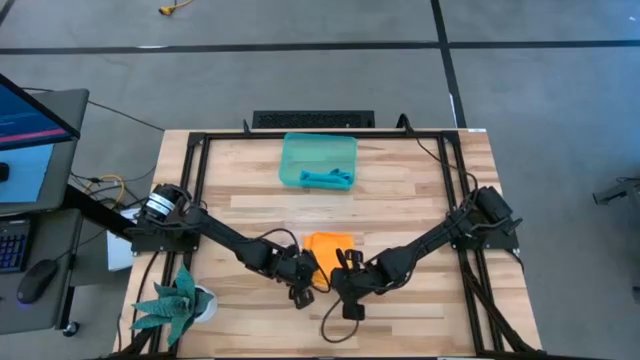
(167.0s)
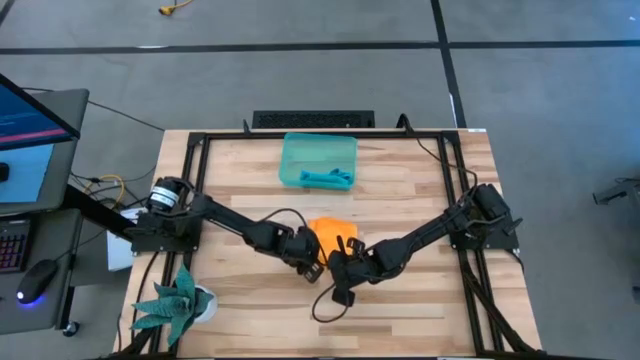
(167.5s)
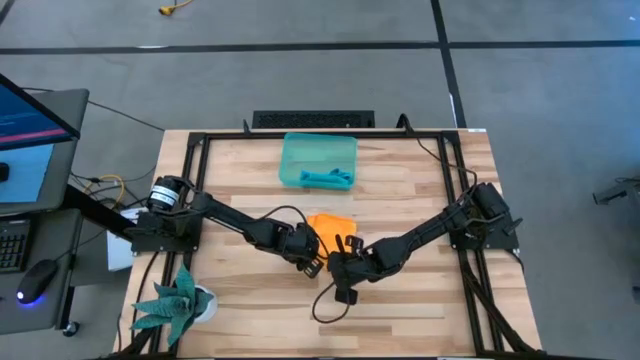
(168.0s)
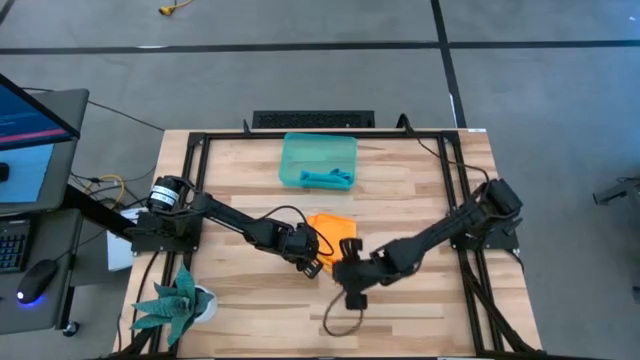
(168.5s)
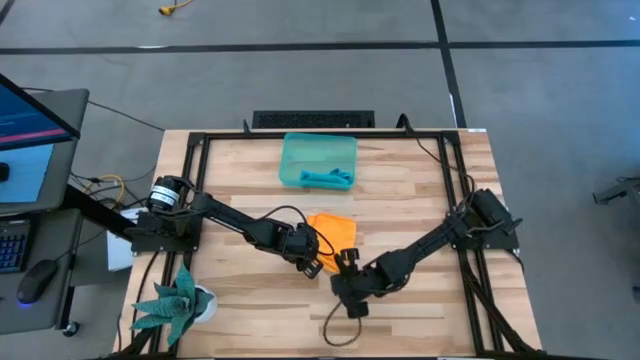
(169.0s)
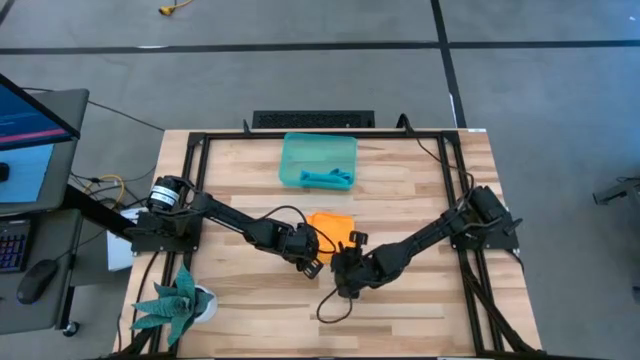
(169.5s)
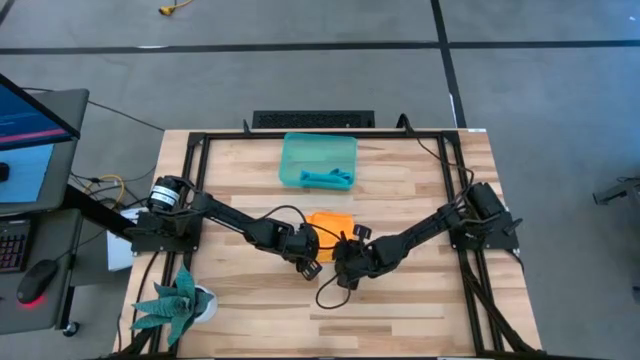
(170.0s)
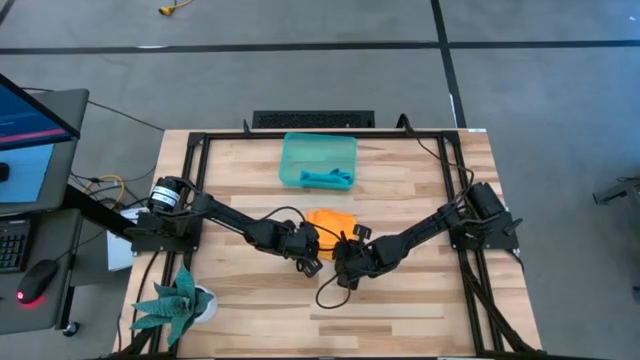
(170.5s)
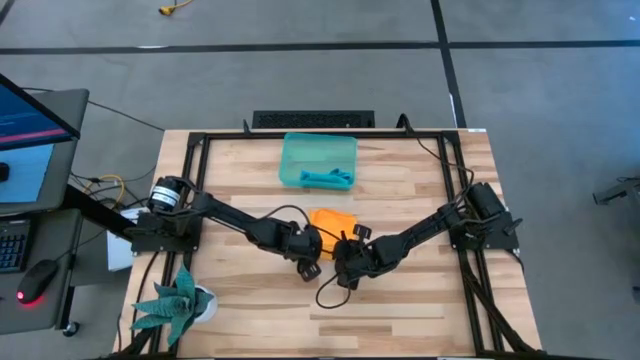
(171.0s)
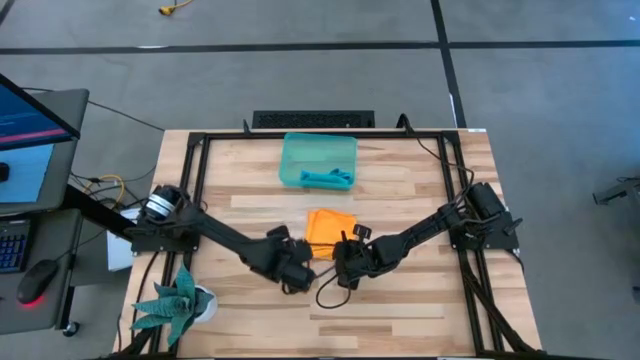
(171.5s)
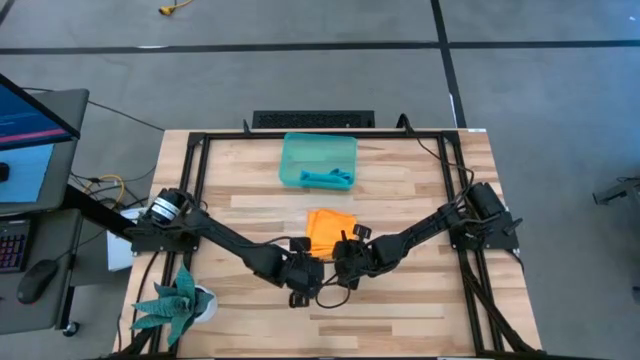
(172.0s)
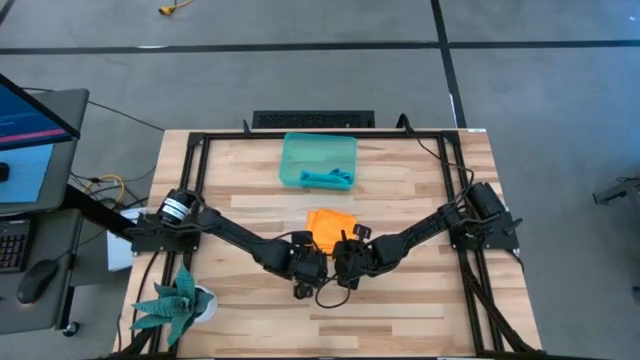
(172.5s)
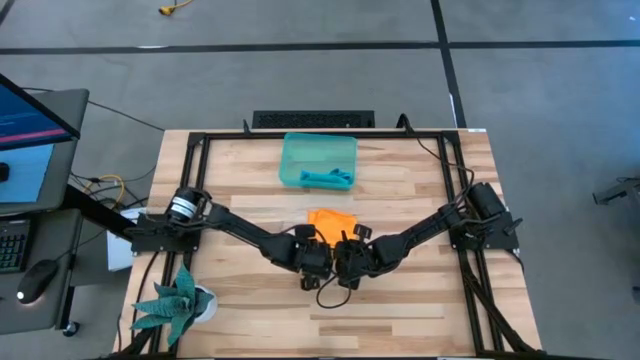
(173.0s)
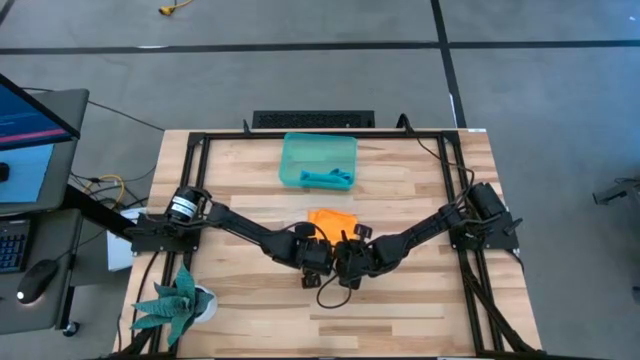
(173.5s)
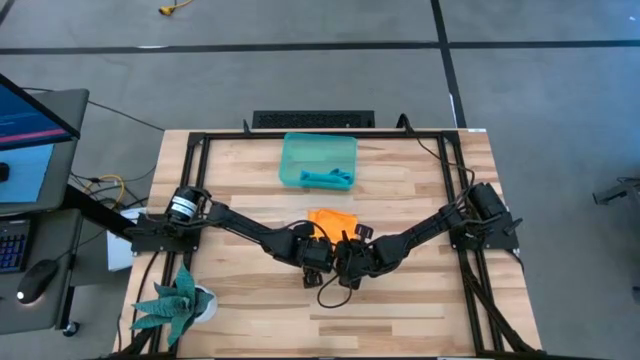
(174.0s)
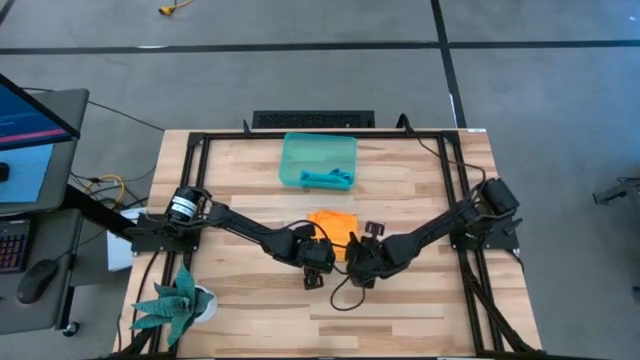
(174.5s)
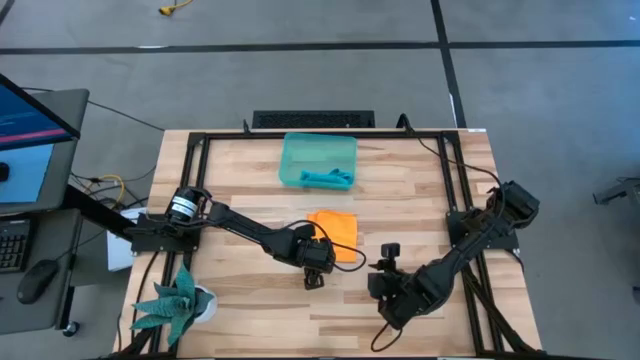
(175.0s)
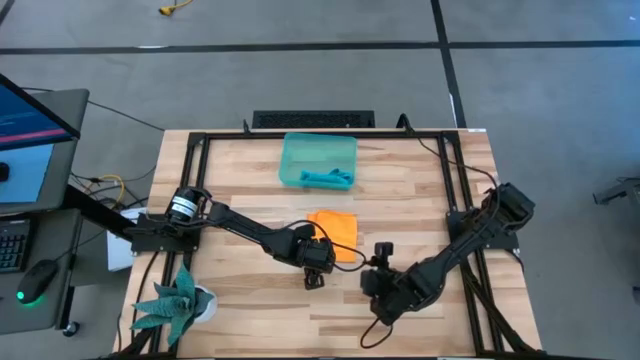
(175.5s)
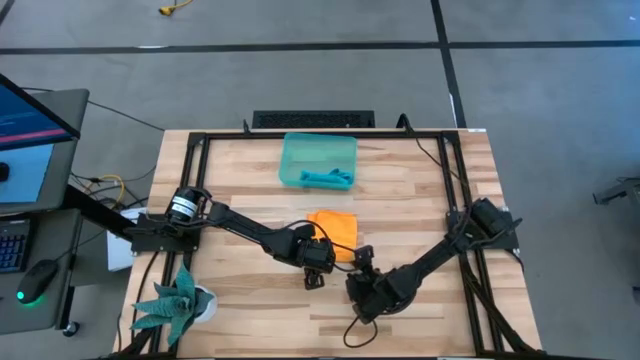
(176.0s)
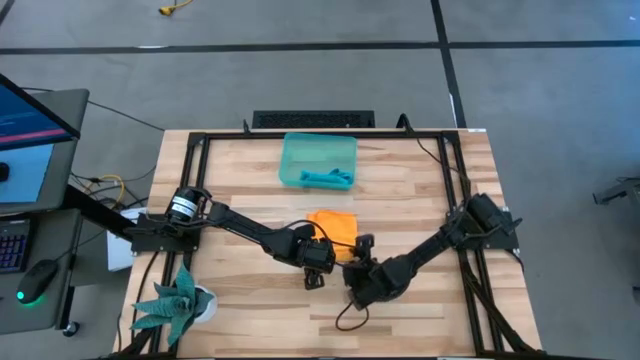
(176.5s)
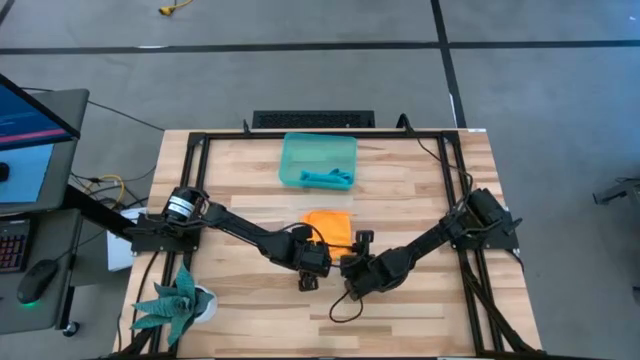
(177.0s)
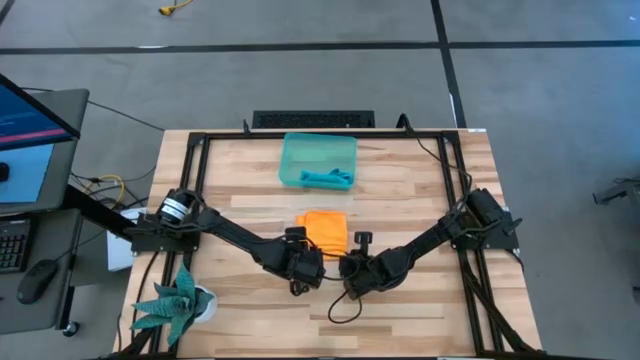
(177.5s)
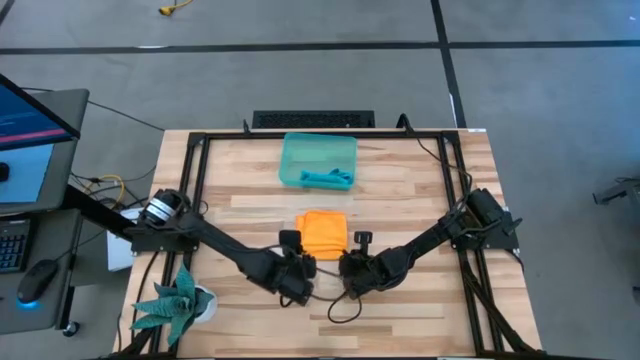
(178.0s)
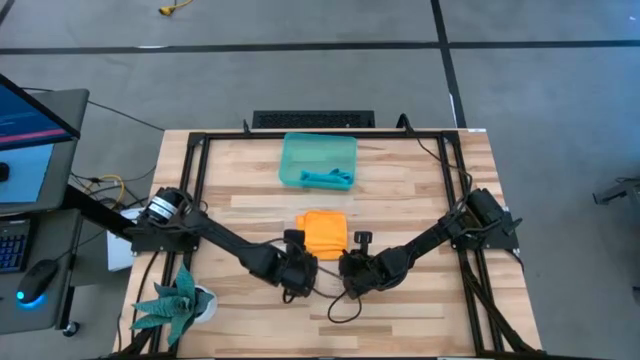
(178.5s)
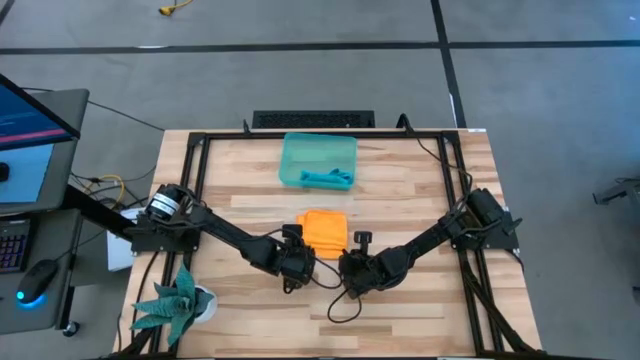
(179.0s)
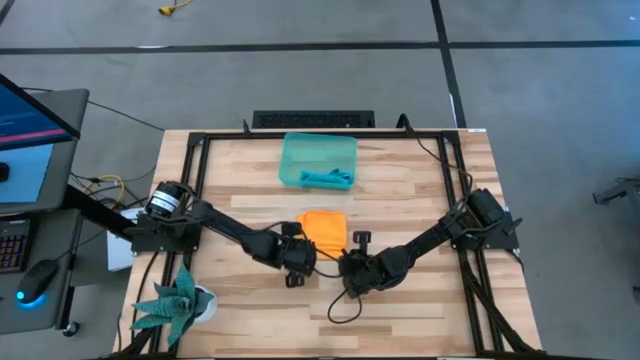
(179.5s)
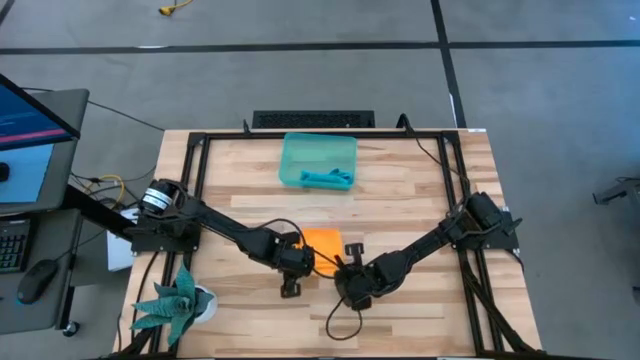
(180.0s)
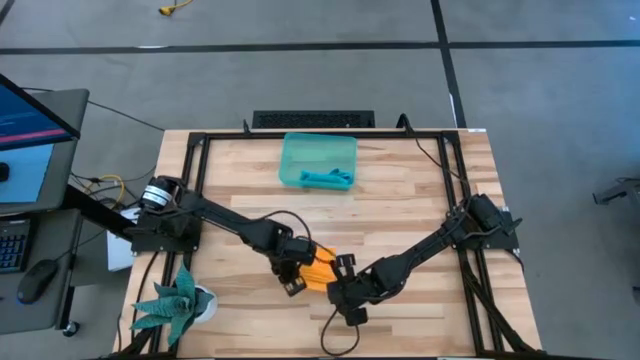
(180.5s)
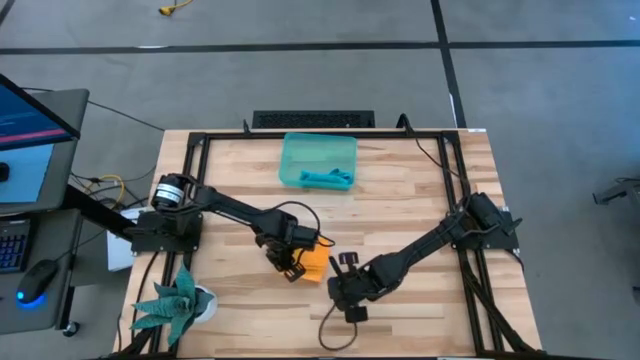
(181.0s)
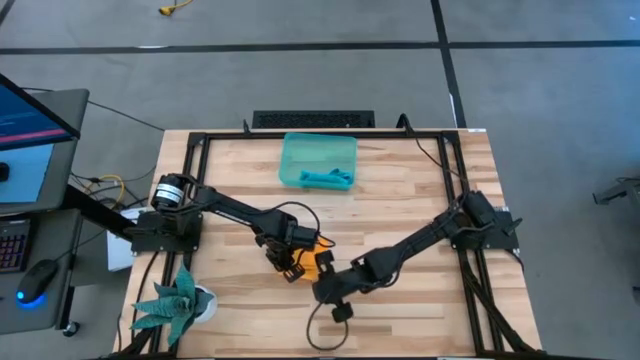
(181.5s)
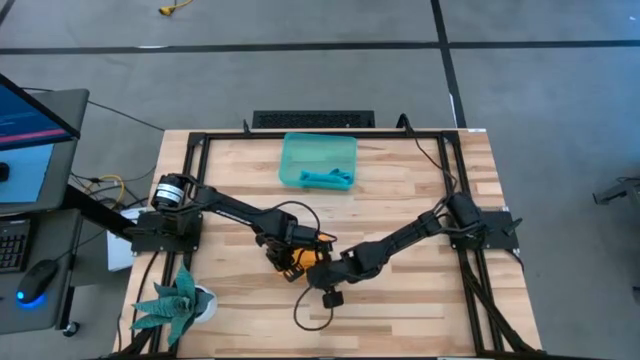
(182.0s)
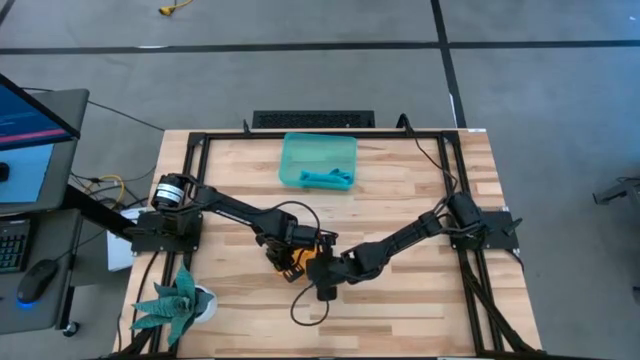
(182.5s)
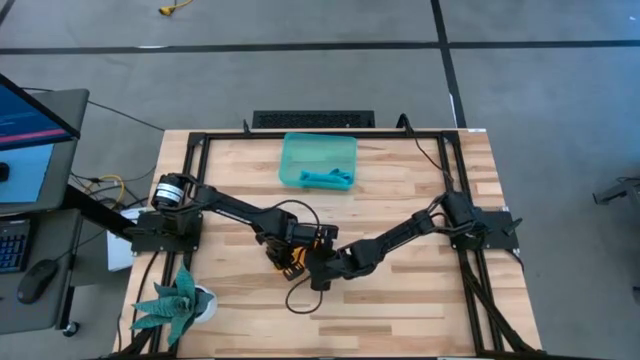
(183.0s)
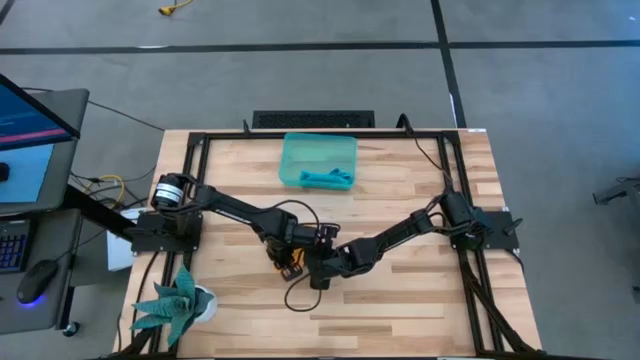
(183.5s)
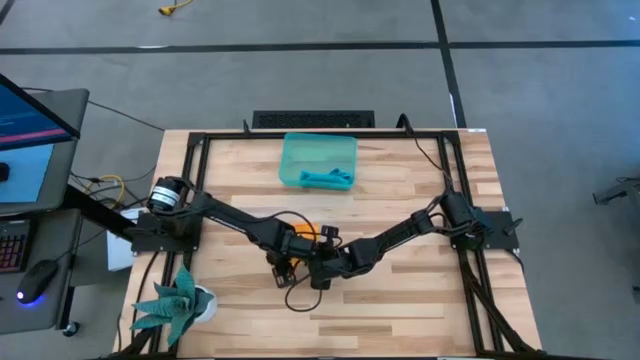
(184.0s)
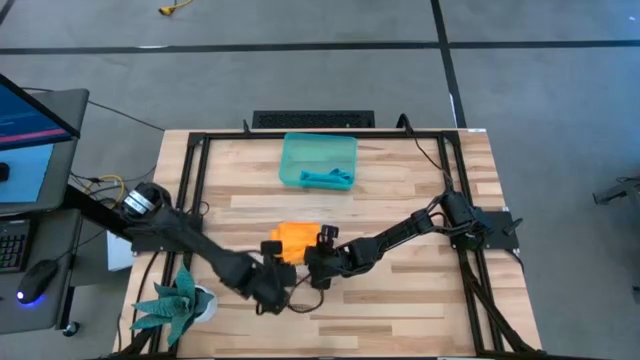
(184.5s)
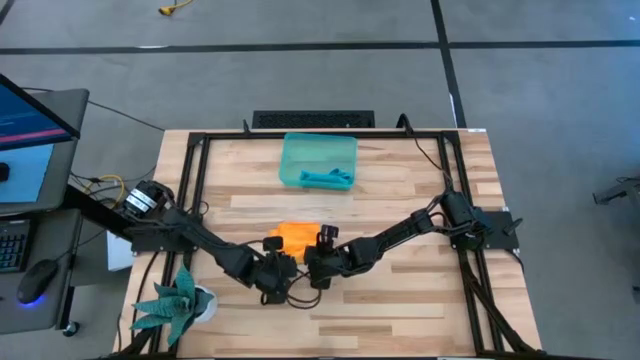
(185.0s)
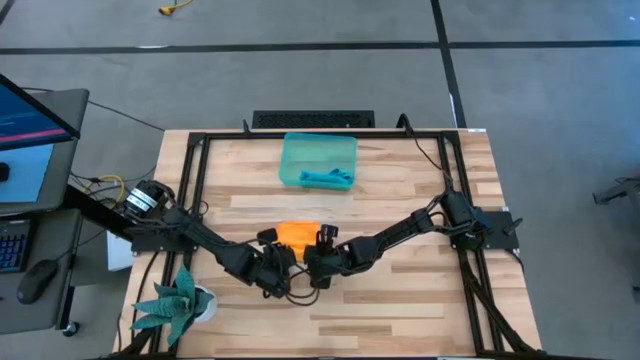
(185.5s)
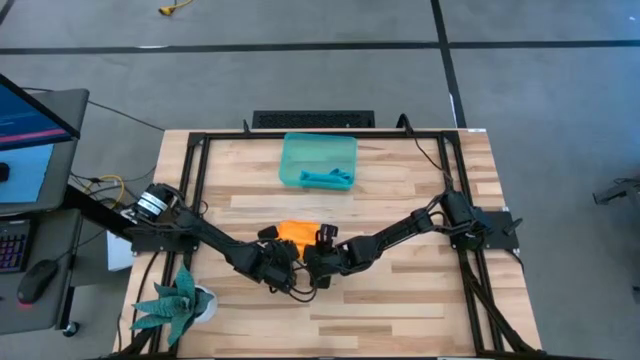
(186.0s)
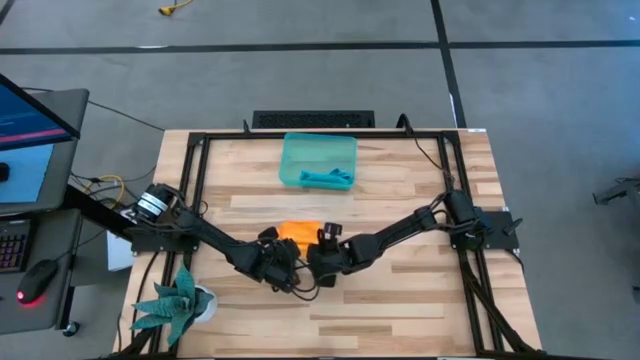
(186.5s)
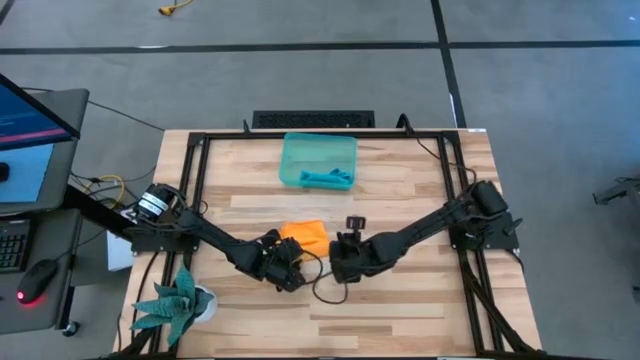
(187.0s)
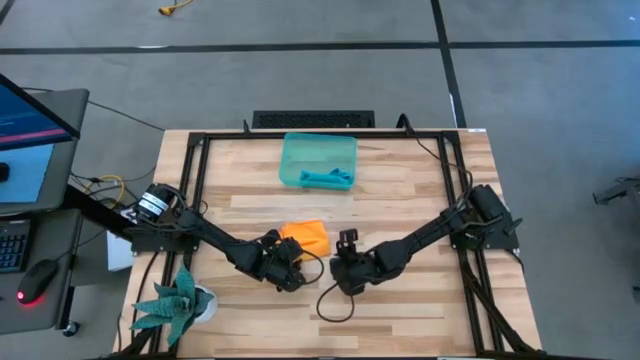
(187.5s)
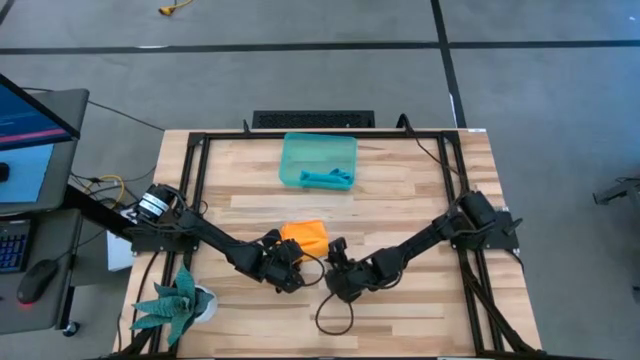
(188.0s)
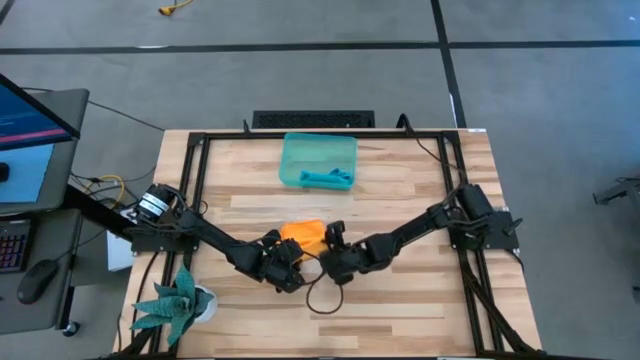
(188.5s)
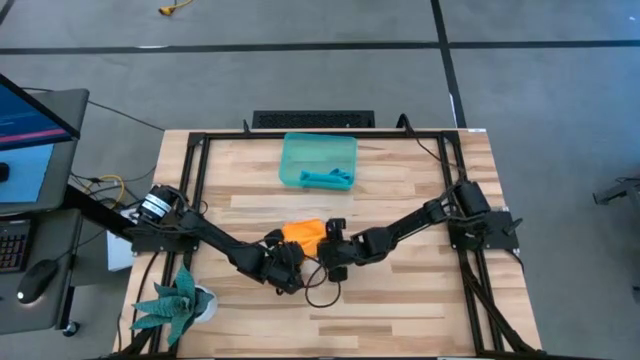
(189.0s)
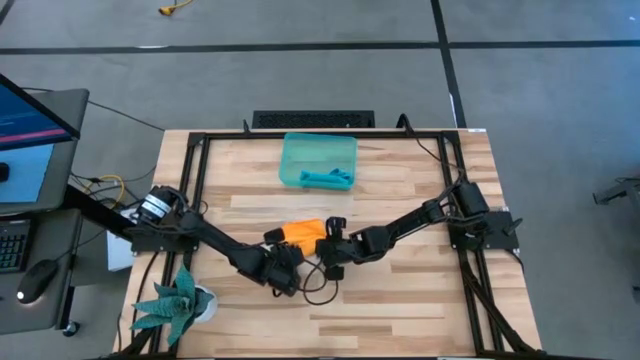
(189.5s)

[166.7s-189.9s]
Task: Roll microfiber towels into tight, uniform cylinder then place into a basket
Roll the yellow microfiber cloth
